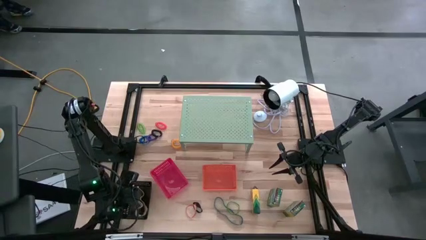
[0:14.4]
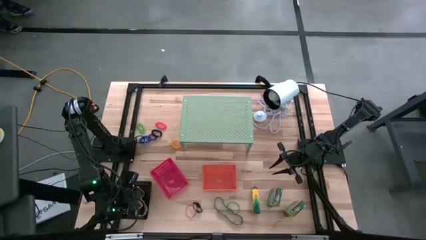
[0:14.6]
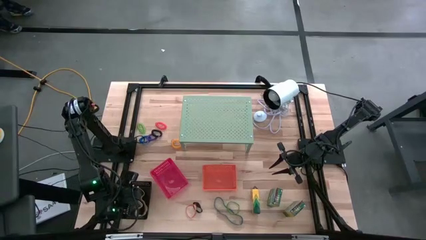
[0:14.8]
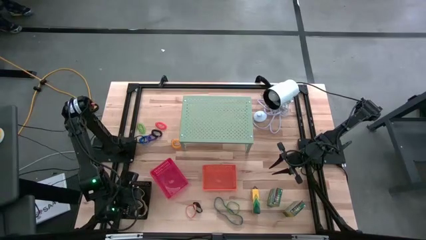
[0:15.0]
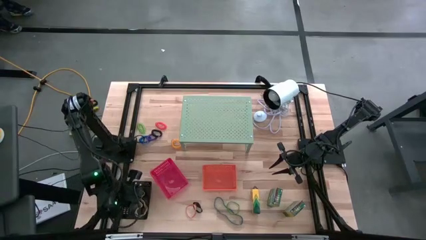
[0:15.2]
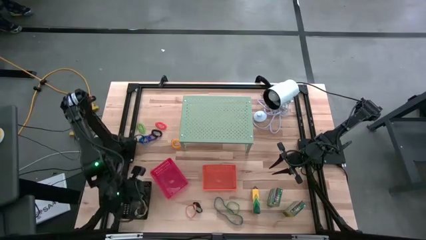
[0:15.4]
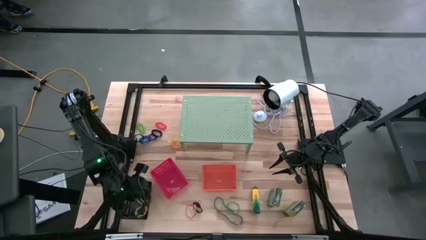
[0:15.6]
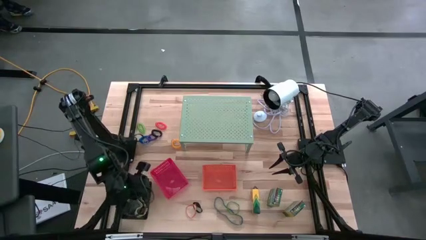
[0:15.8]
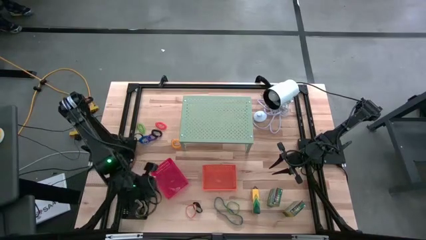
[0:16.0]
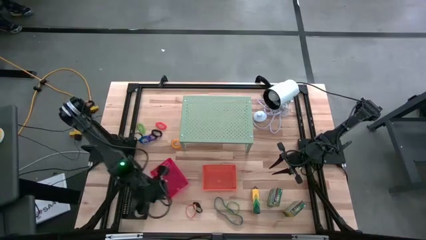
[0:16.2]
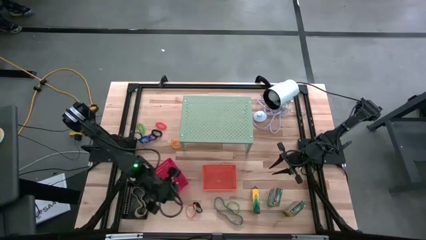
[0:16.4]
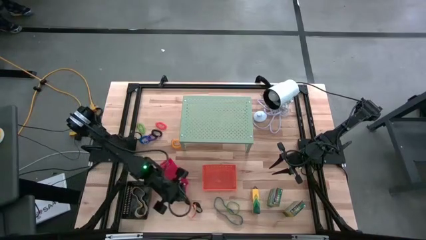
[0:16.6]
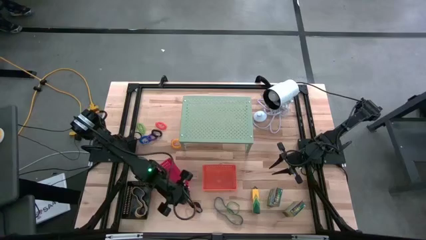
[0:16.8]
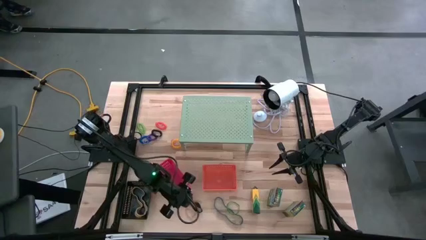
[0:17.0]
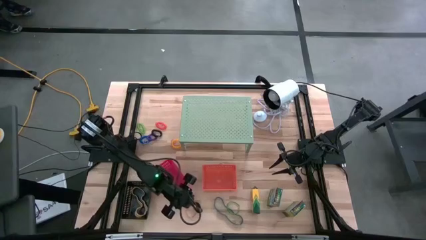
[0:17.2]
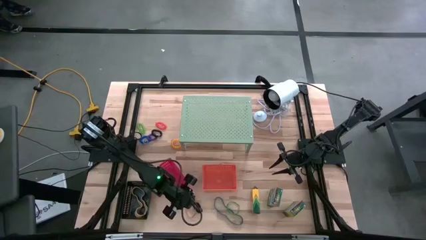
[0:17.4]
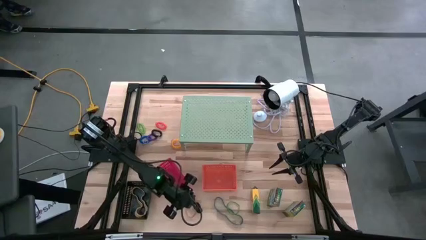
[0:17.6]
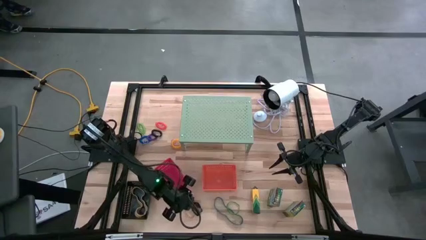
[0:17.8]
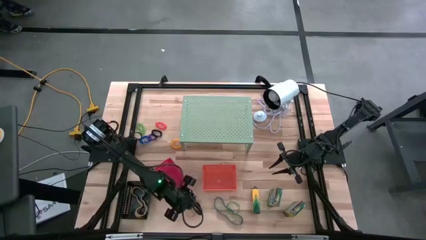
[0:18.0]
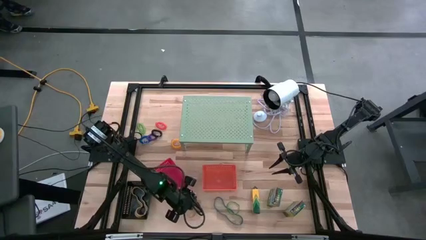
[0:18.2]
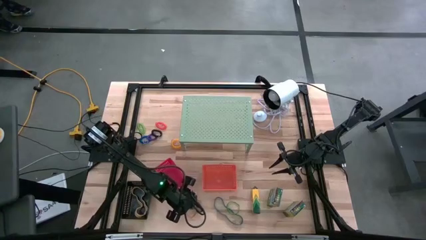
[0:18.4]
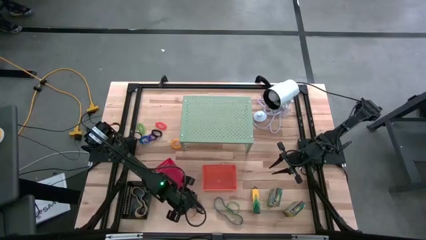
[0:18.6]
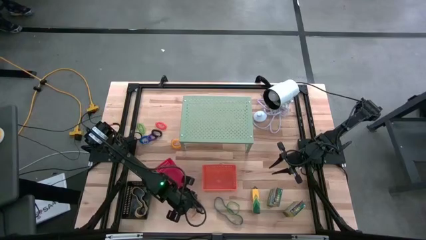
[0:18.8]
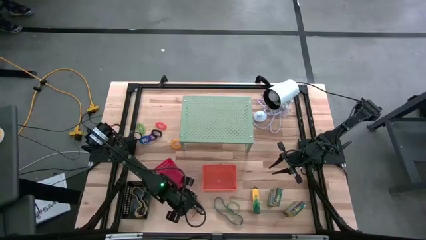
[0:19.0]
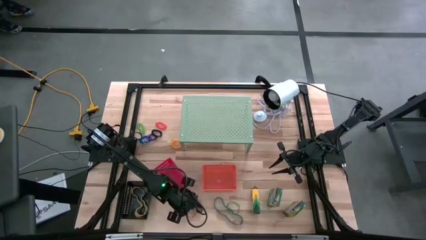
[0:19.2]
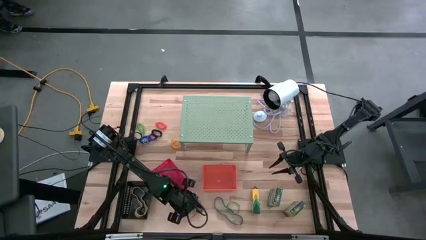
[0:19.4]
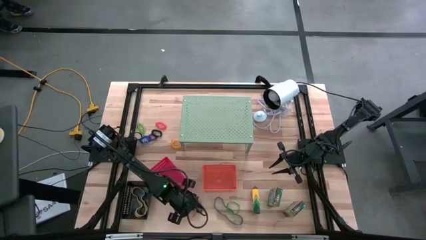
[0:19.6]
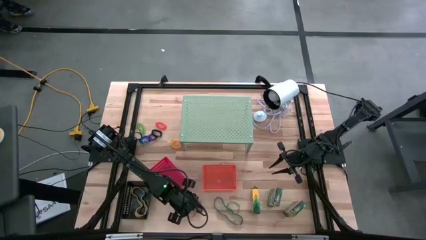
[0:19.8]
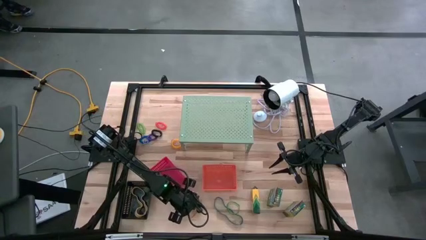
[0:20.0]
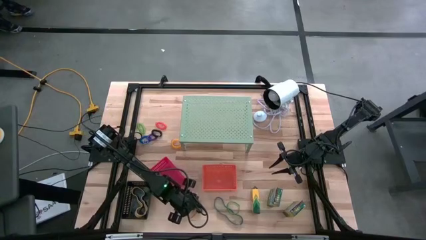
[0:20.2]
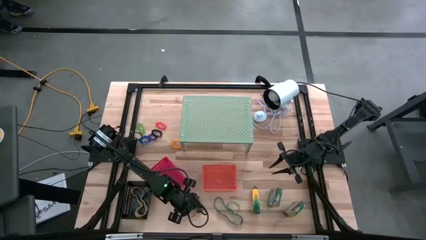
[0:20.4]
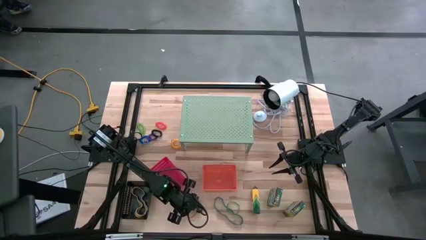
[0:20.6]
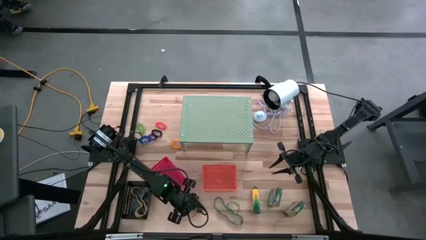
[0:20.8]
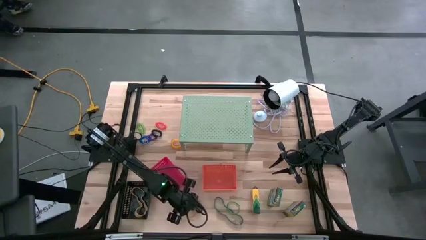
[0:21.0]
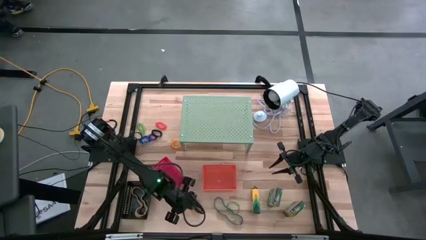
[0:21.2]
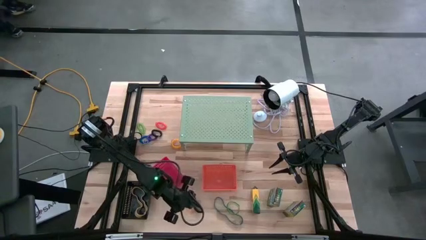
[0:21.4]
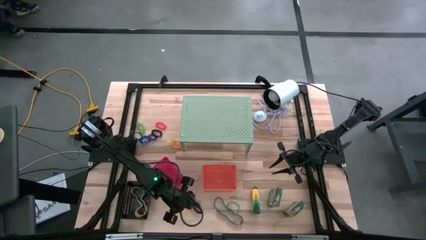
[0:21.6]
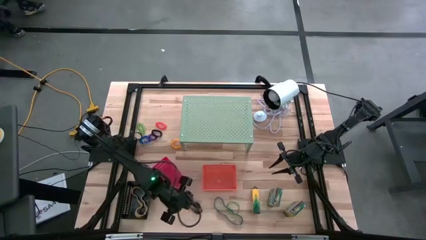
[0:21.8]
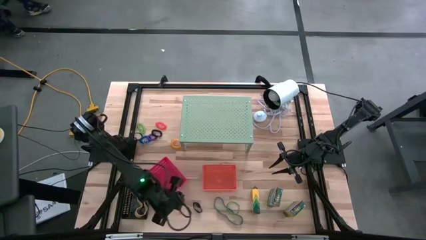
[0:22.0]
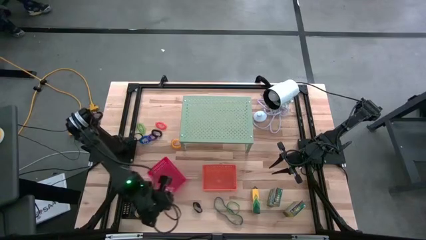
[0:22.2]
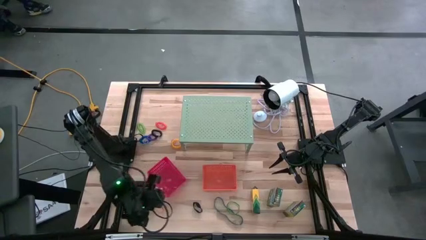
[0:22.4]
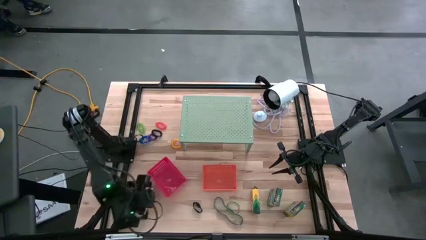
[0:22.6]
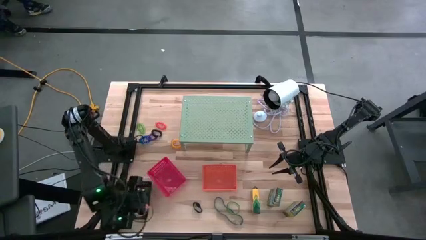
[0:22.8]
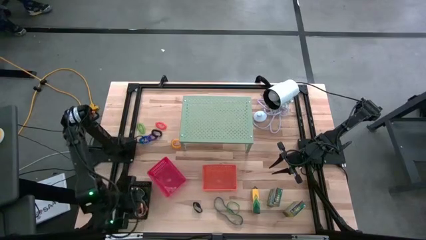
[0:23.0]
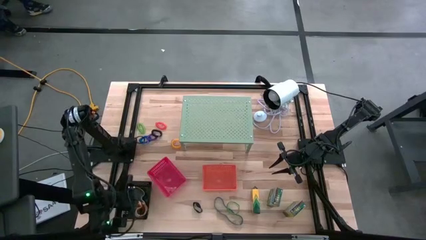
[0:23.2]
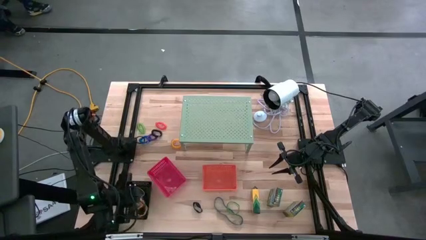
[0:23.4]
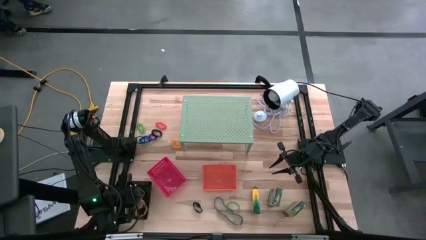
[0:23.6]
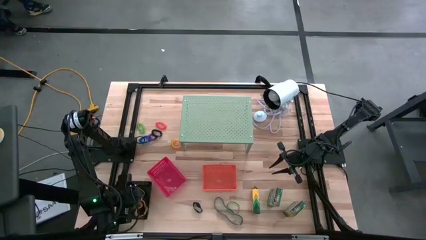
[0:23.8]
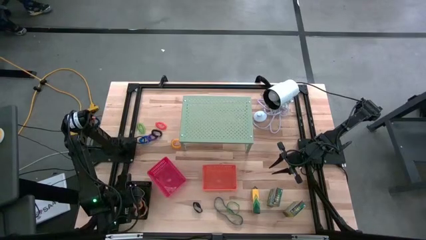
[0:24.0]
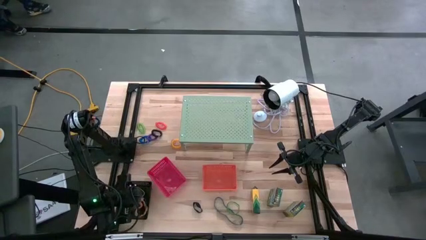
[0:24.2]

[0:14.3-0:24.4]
Task: Pick & Place Office Desk Supplies
Put the orange rubber band into the black bin

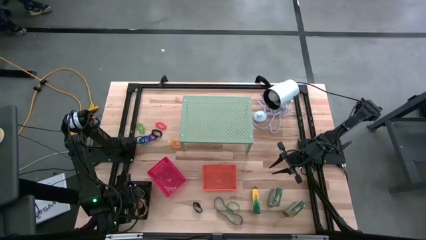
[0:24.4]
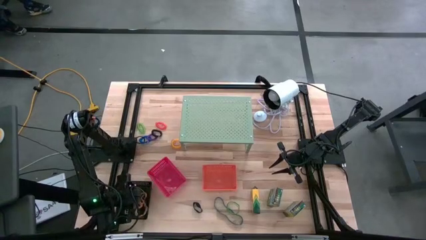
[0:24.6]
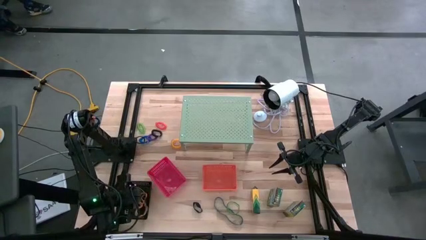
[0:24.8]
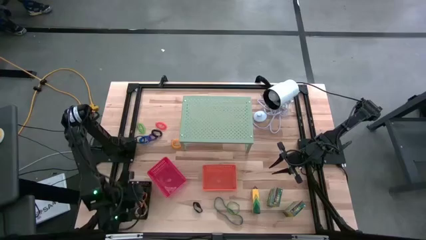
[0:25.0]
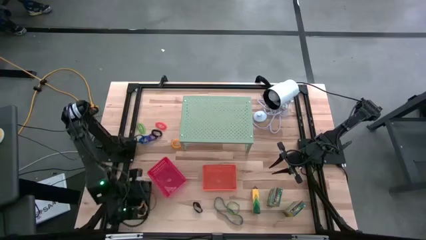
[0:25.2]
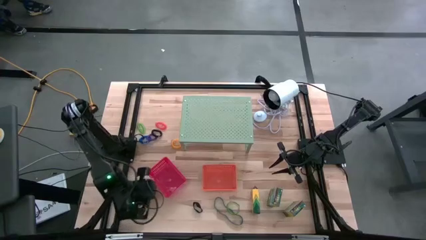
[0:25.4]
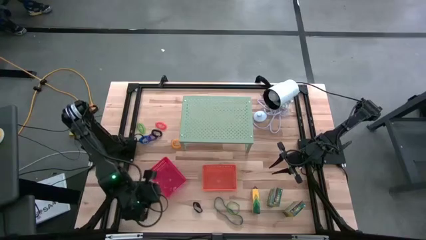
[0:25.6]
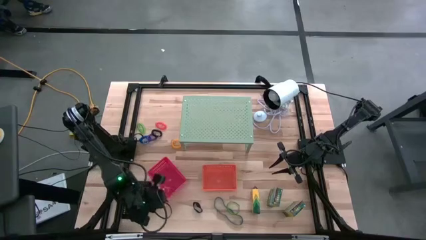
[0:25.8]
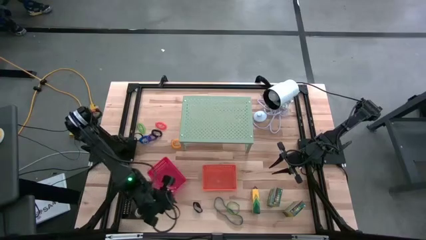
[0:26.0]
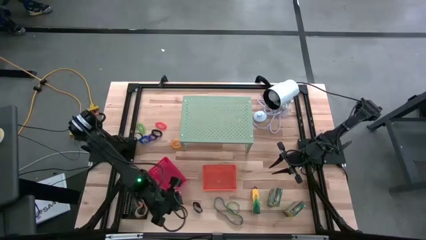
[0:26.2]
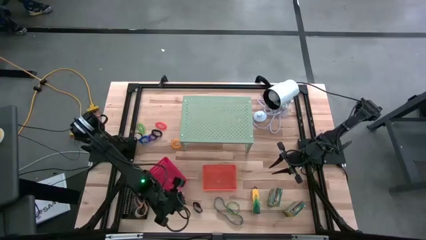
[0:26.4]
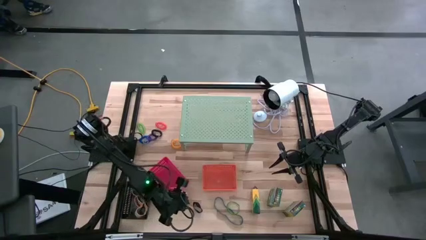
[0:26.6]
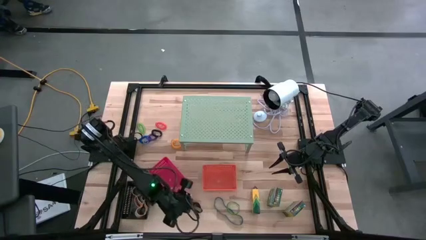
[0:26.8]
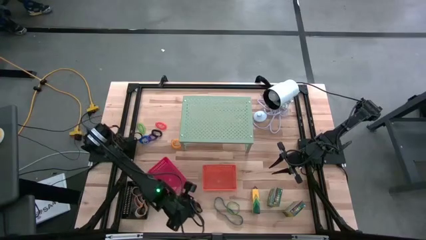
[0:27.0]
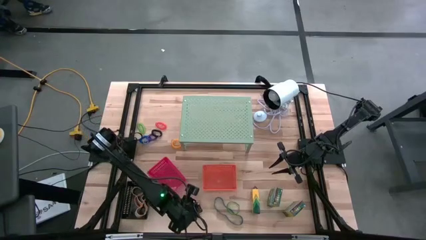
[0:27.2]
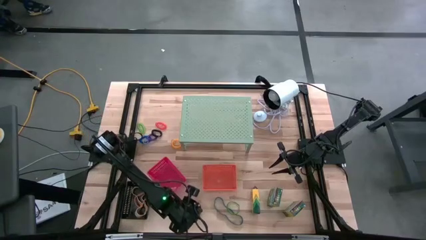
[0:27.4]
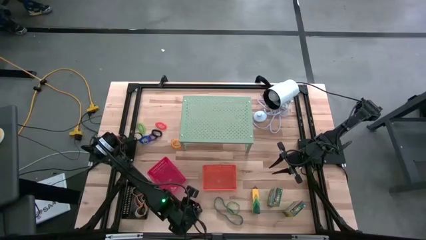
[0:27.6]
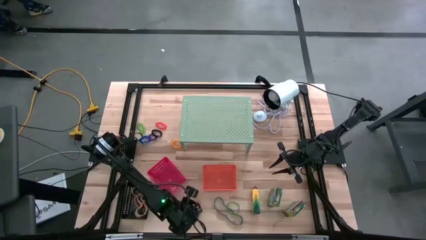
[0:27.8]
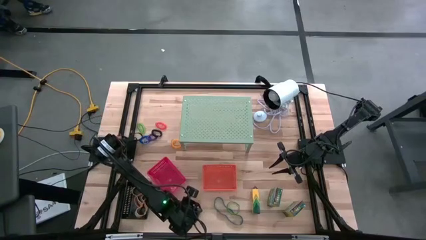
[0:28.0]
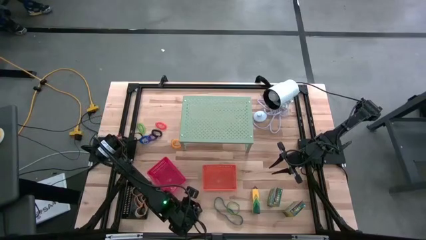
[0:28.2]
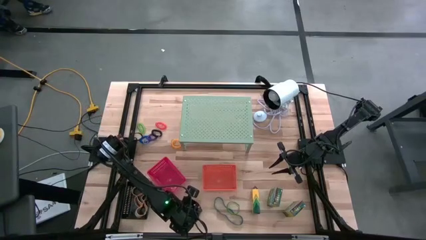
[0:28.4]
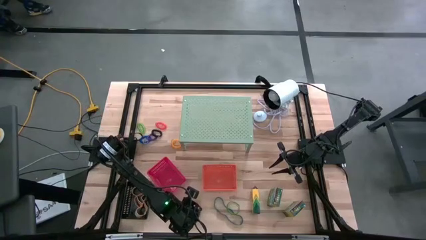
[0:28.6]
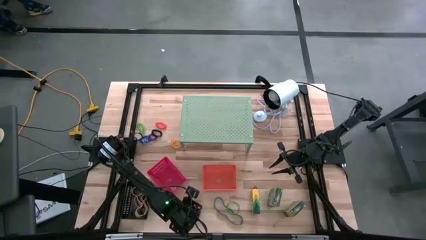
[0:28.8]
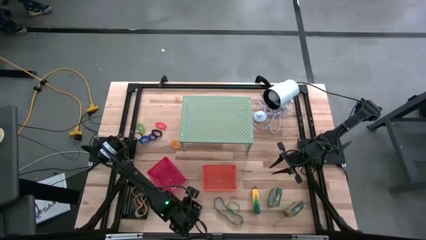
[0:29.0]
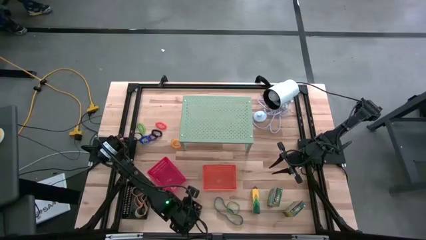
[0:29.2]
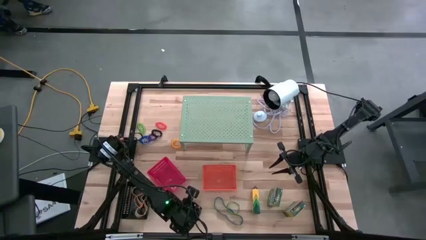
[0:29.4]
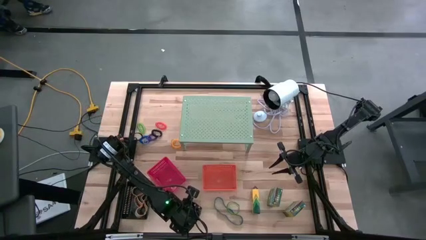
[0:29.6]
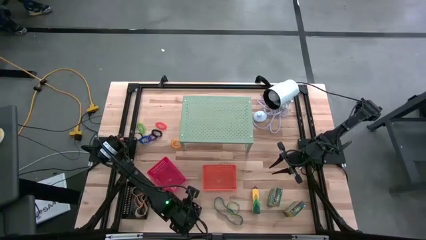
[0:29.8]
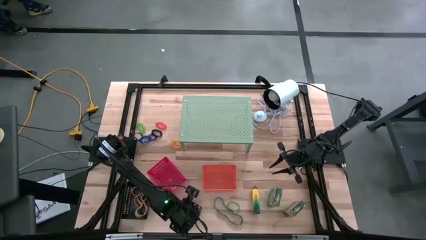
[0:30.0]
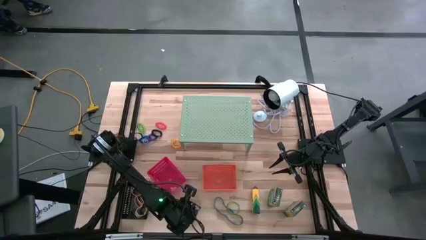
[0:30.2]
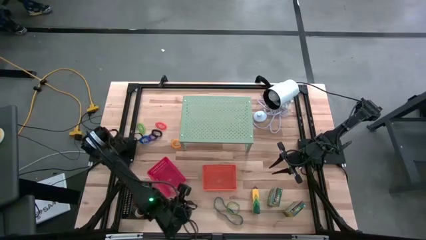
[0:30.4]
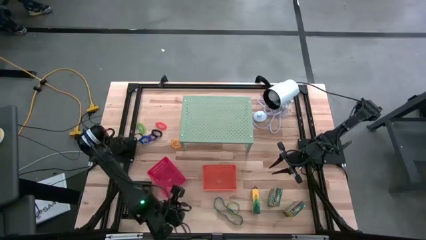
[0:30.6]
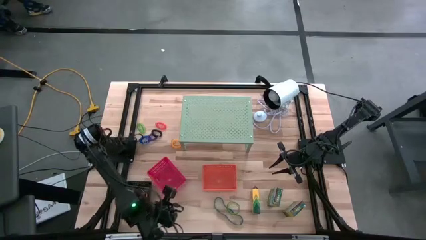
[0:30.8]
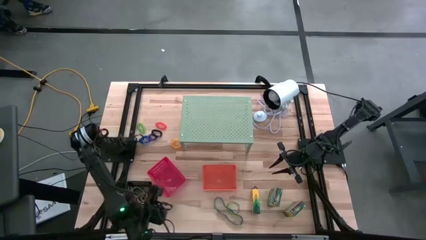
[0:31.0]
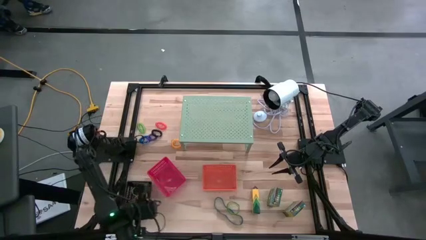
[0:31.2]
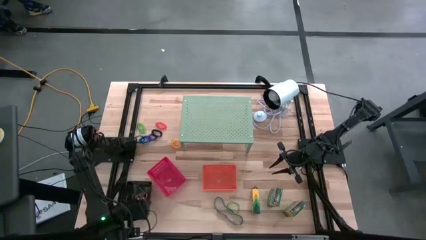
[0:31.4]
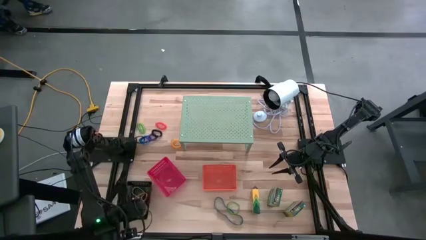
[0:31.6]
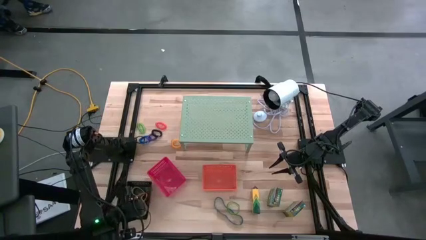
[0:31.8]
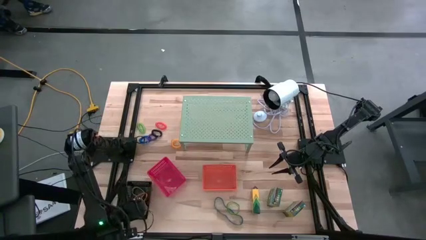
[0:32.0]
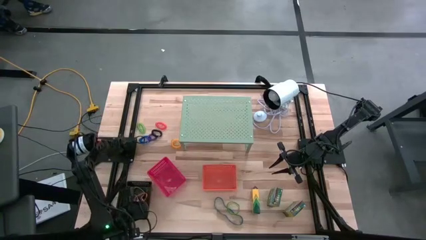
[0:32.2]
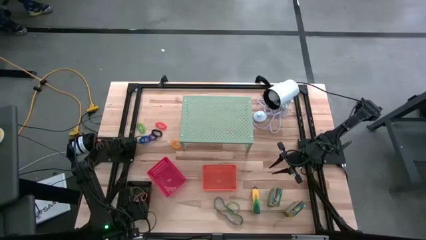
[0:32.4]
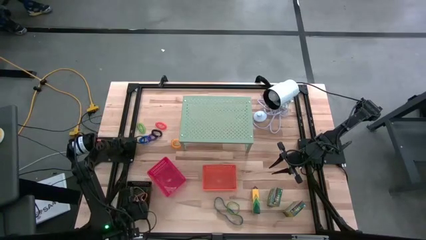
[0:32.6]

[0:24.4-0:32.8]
Put the black rubber band into the black bin
